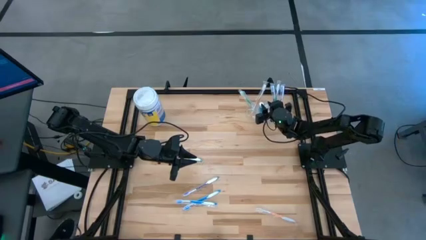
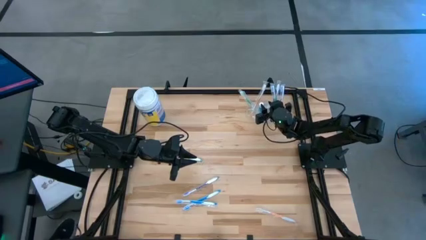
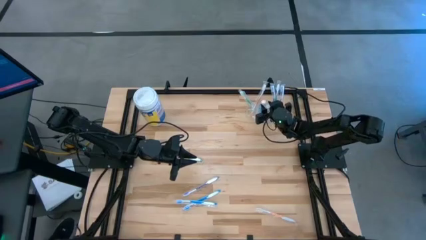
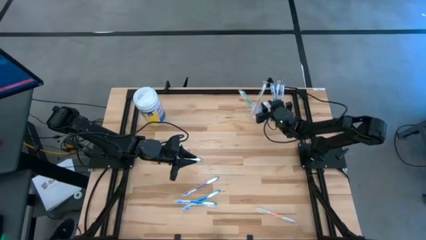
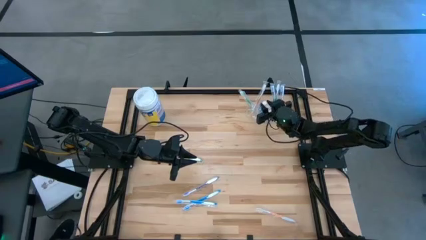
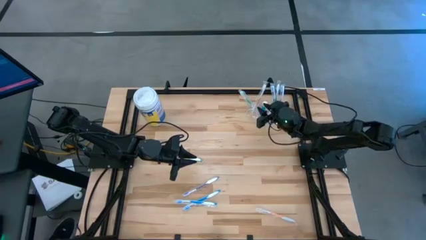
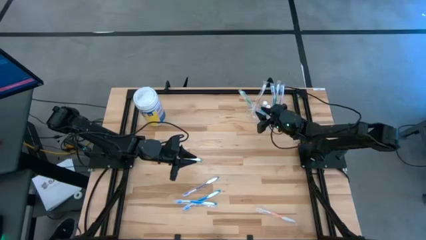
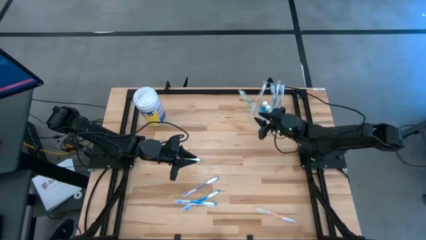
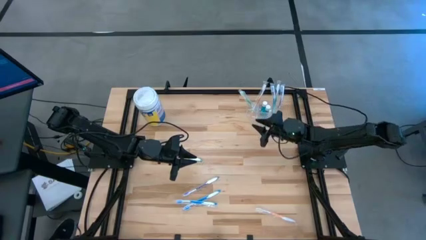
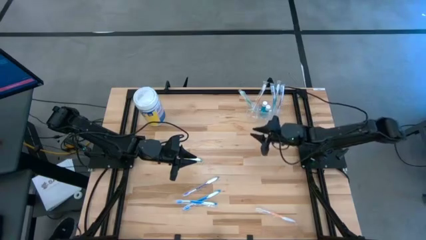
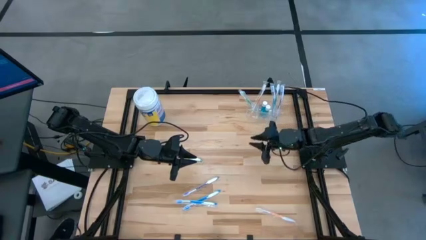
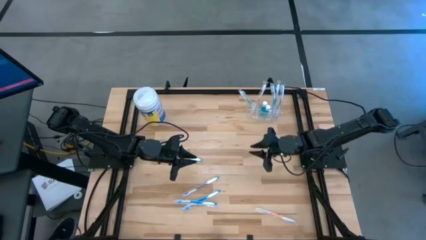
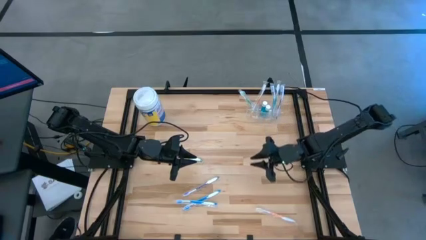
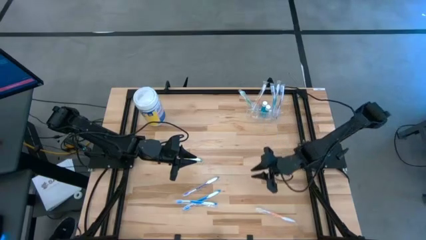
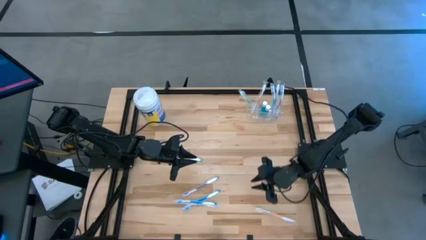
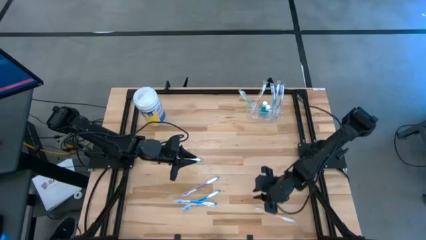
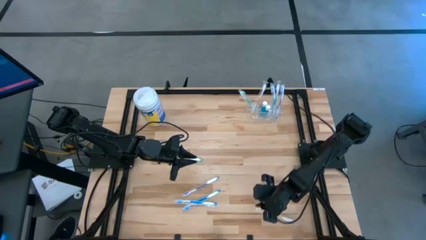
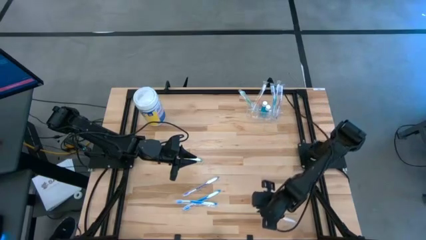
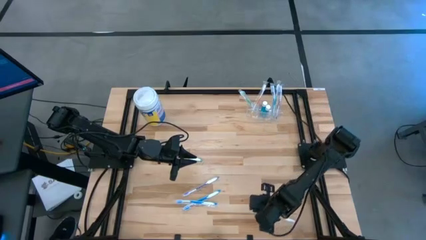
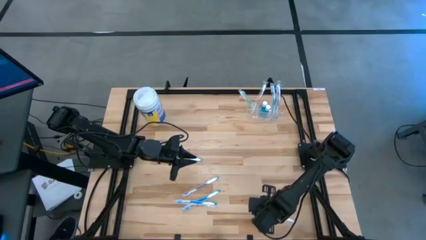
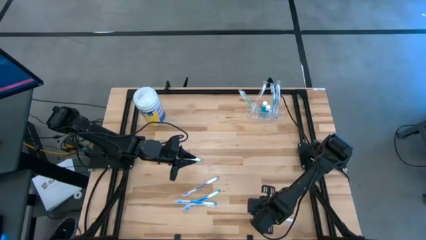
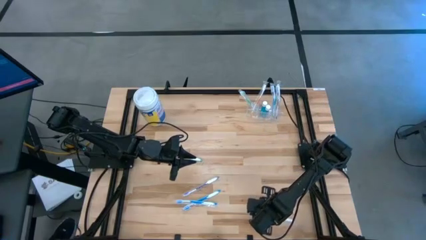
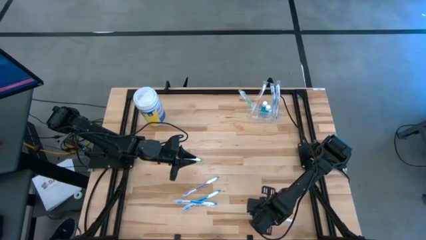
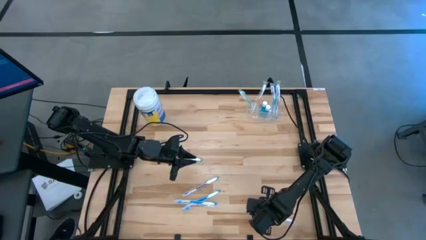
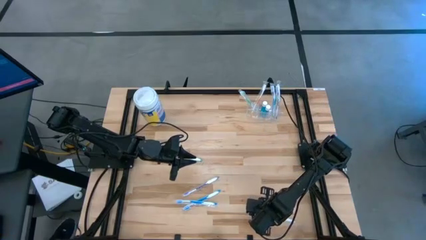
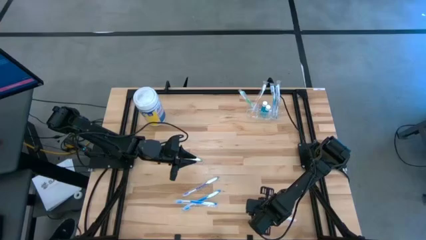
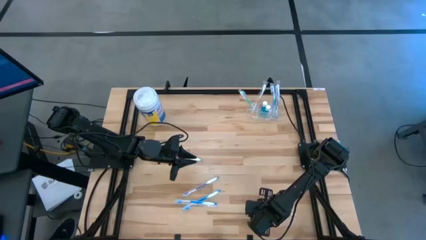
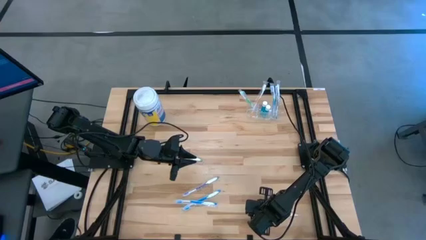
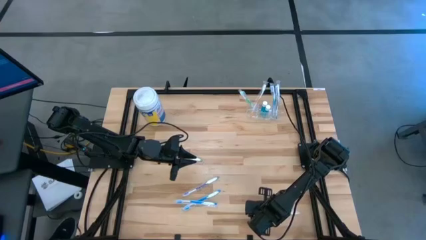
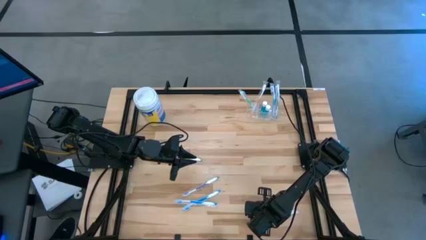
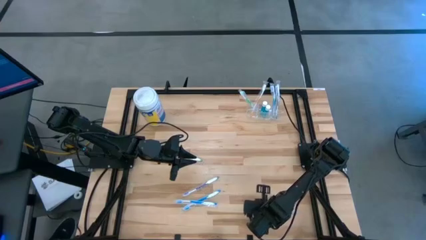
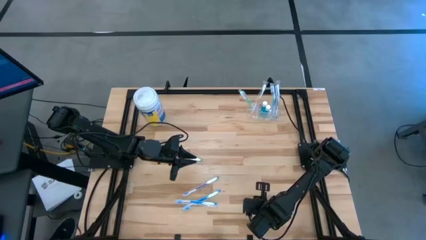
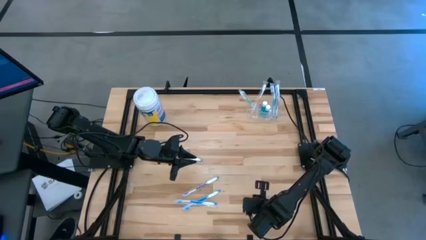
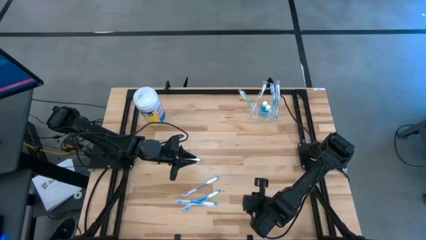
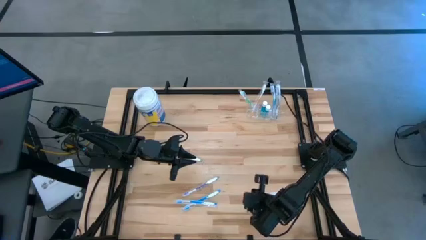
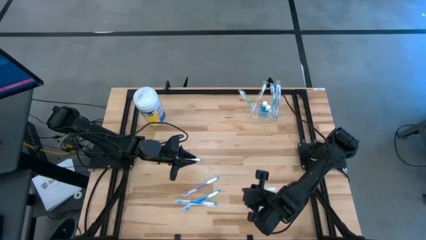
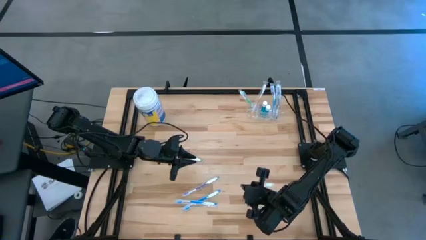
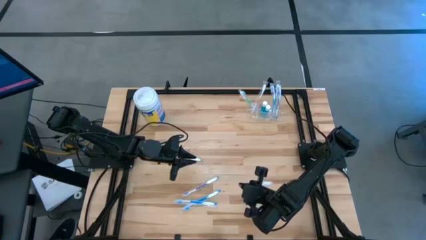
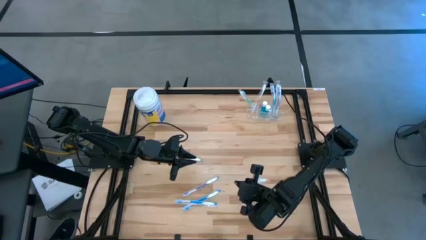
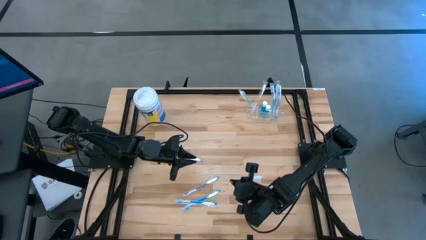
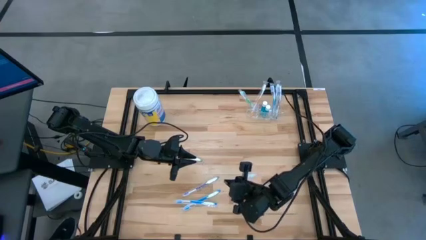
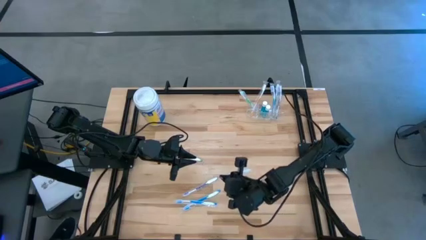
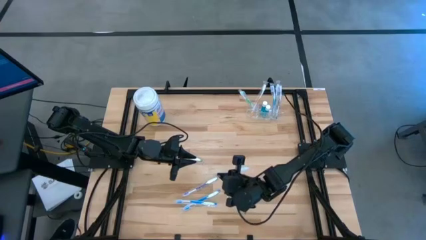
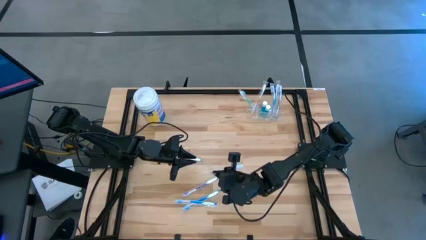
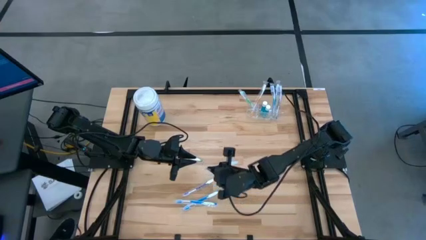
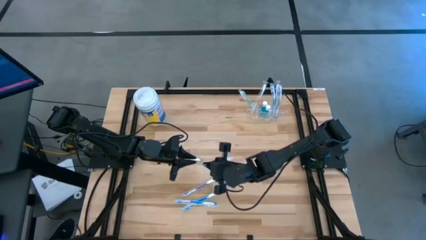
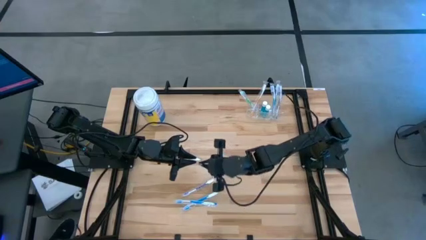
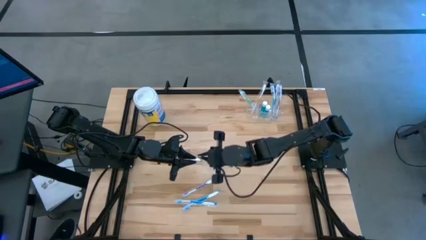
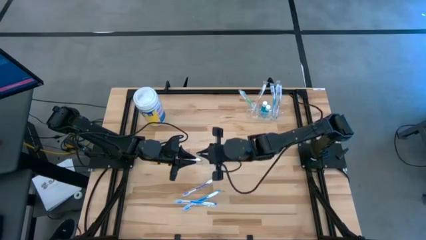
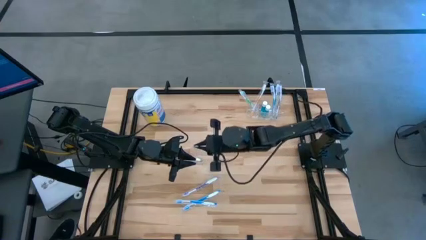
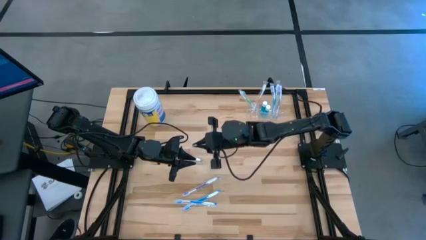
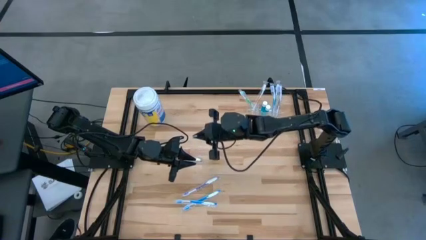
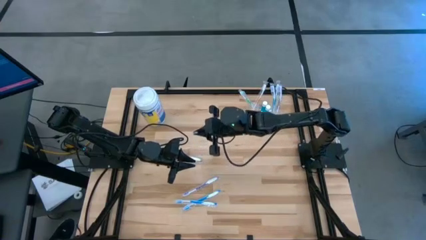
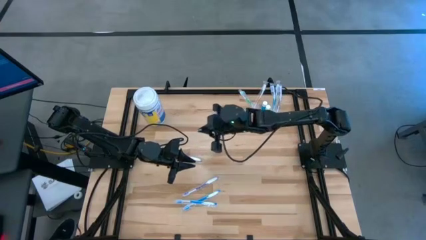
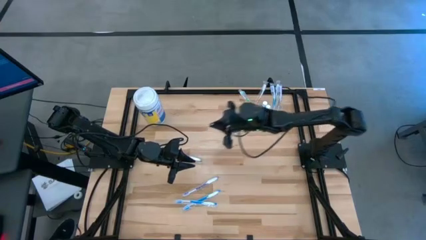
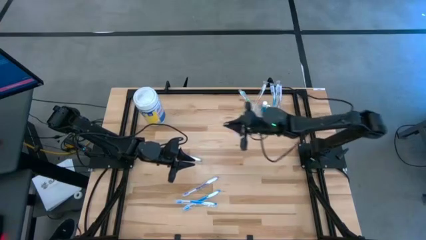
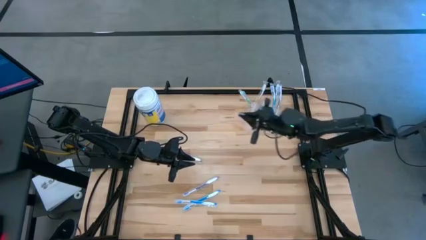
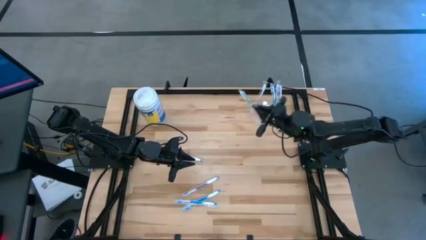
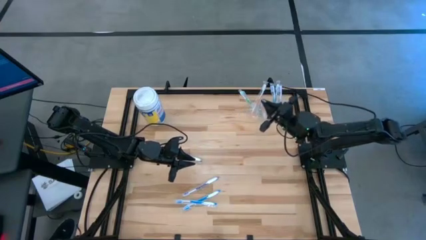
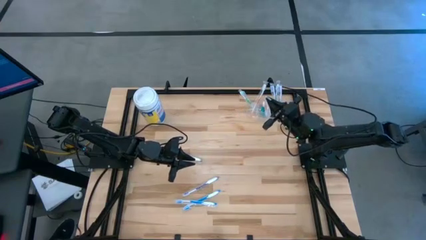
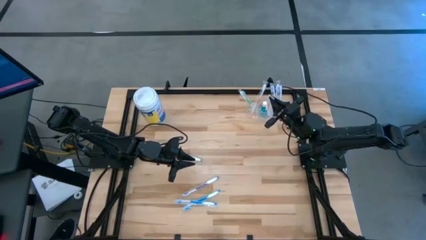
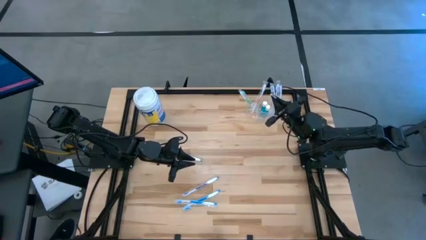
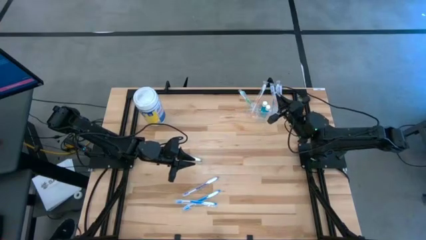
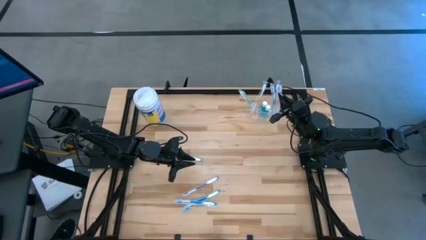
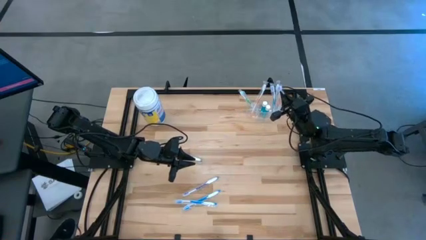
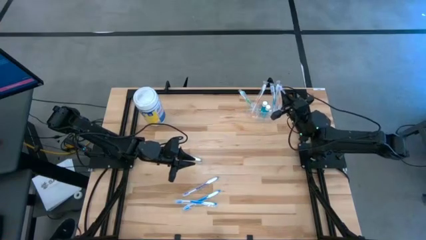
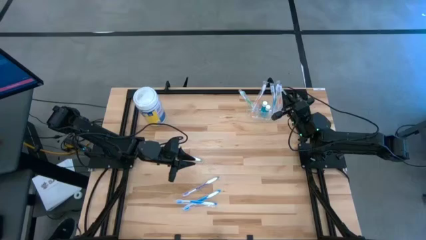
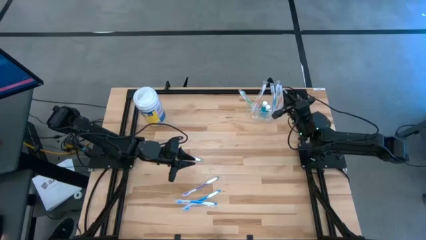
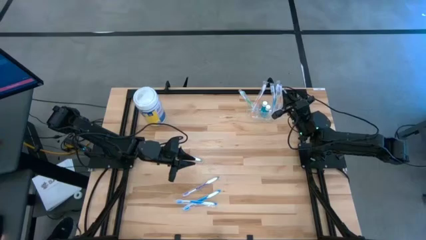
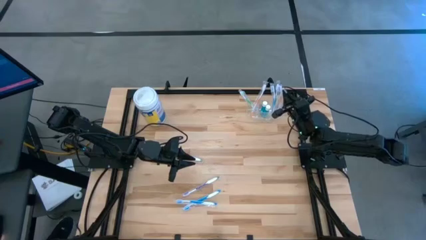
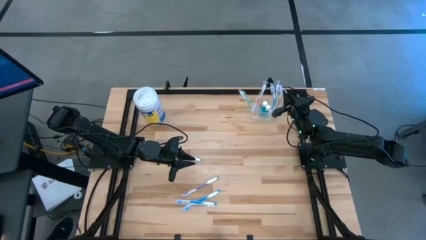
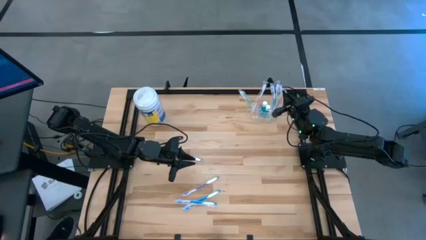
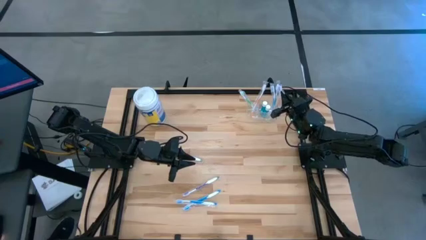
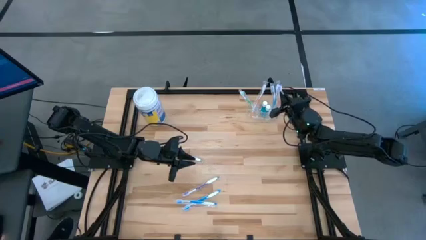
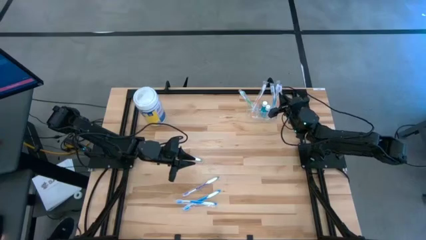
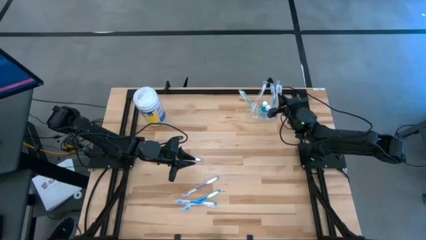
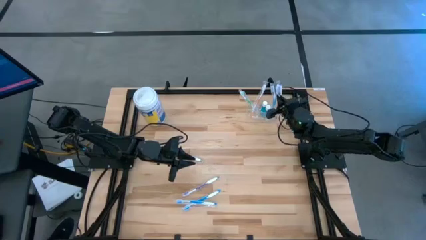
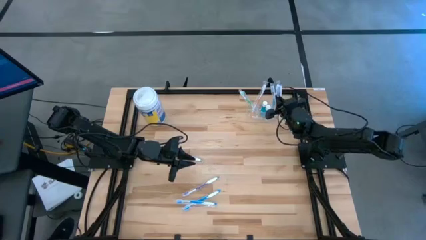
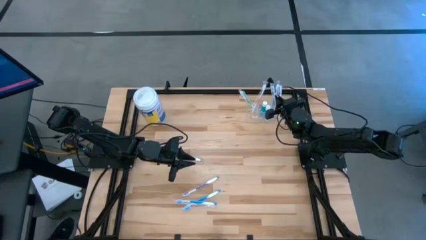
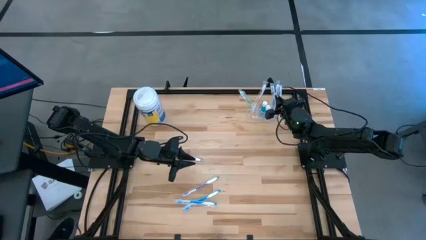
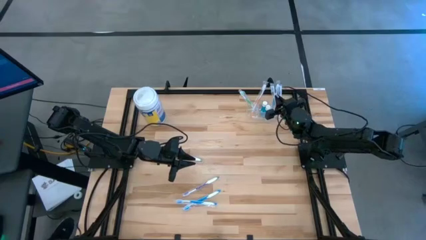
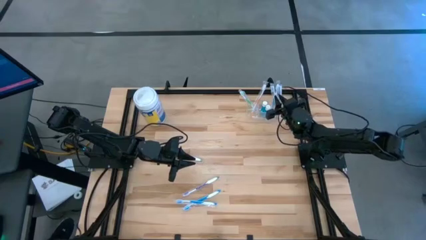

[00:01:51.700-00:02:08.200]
Task: Pick & Place toothbrushing station
Put the orange toothbrush into the right transparent organizer
